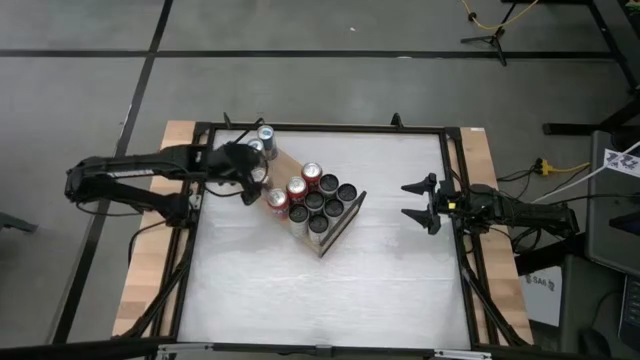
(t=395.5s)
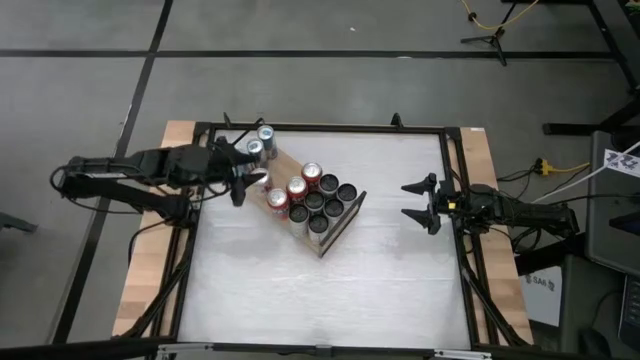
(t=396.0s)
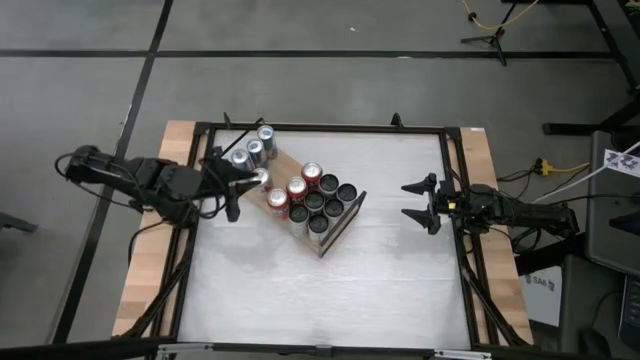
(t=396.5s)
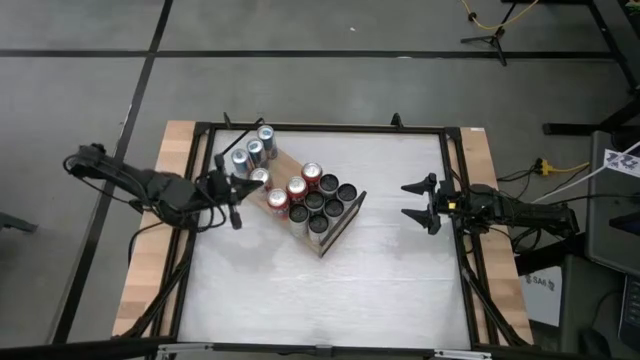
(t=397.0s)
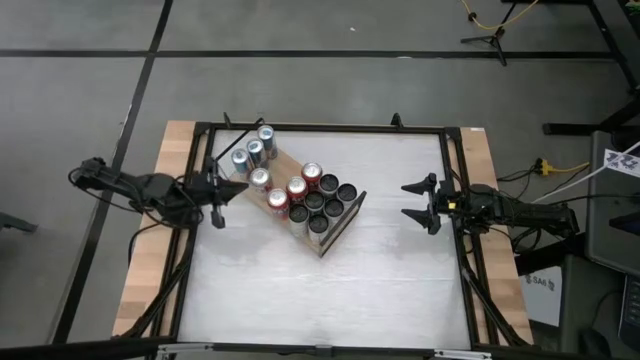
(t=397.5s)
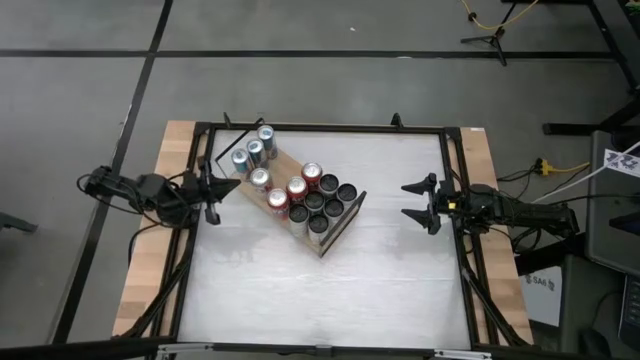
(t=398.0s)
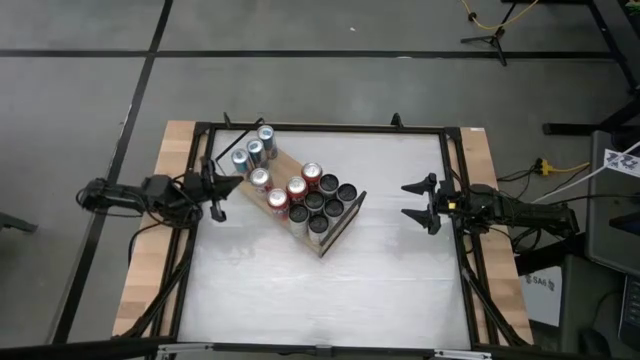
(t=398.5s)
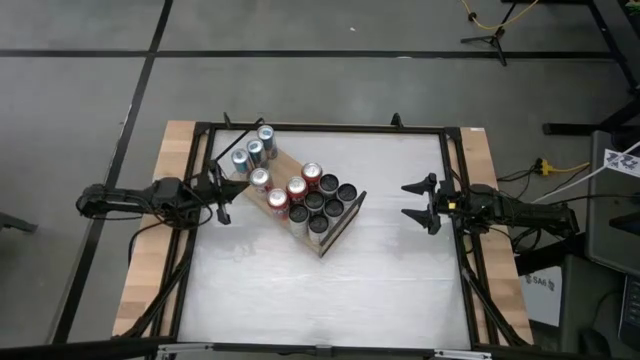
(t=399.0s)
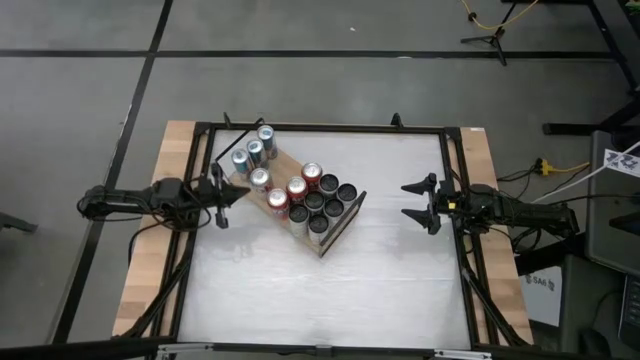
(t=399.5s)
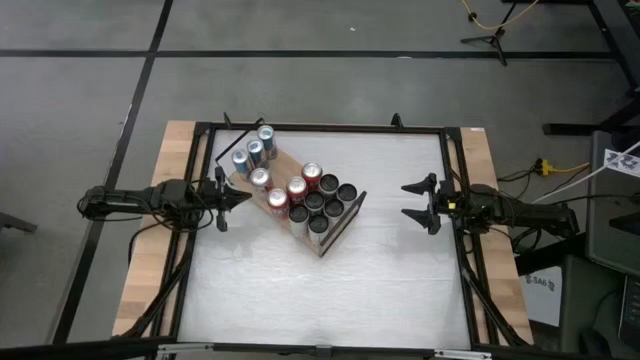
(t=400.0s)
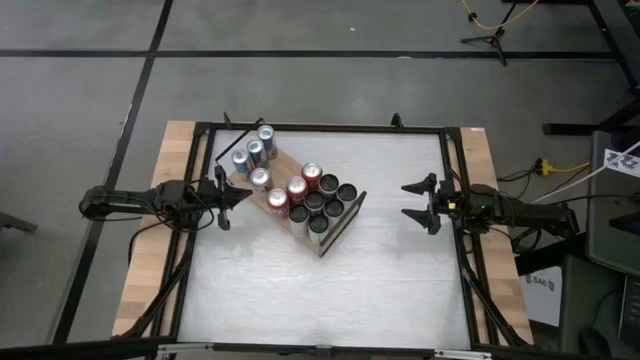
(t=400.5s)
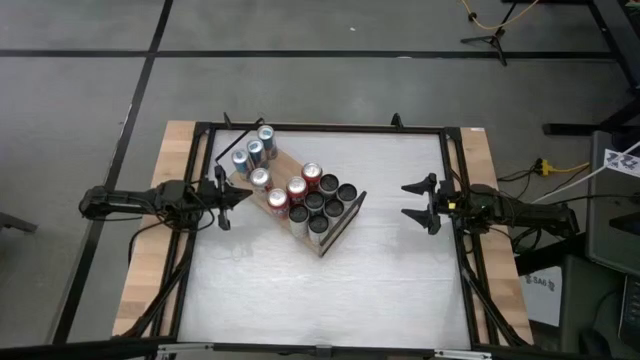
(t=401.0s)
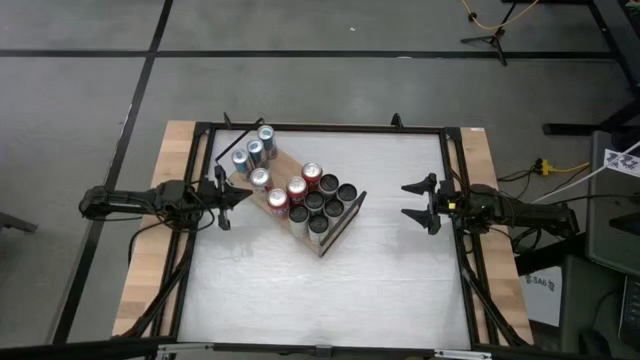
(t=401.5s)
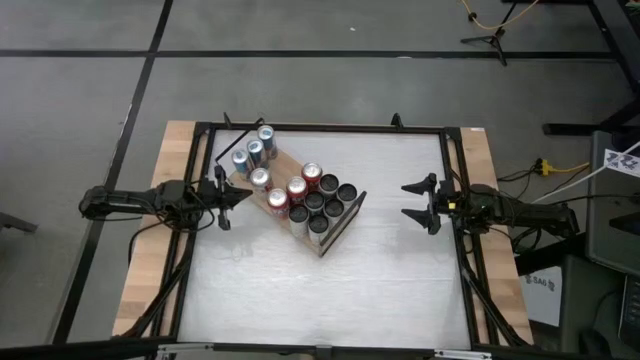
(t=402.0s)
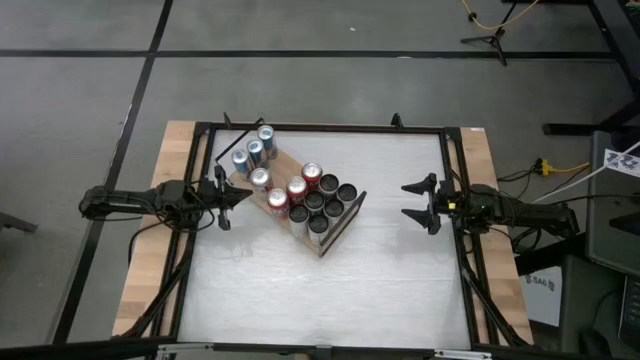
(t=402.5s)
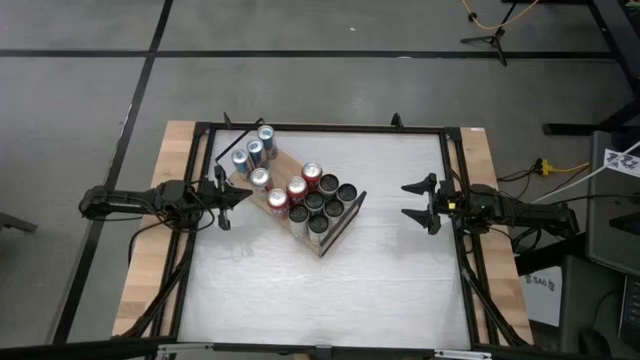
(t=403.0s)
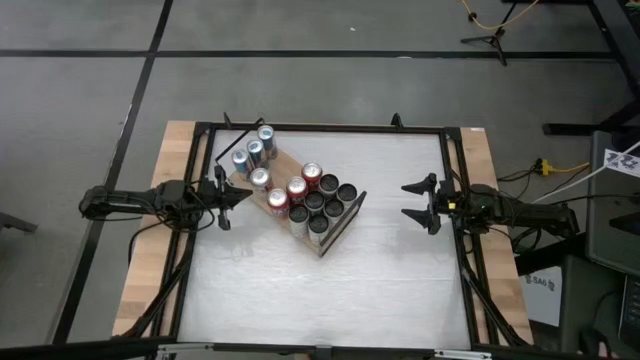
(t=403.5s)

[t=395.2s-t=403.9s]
Task: Place canned beverage on shelf
Return to Home Position
